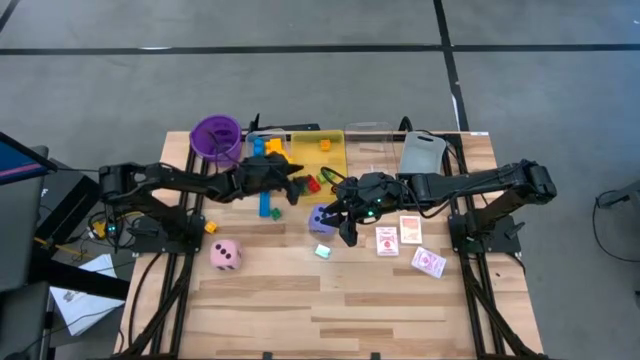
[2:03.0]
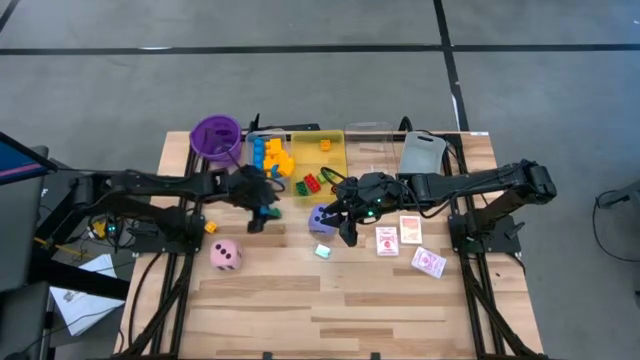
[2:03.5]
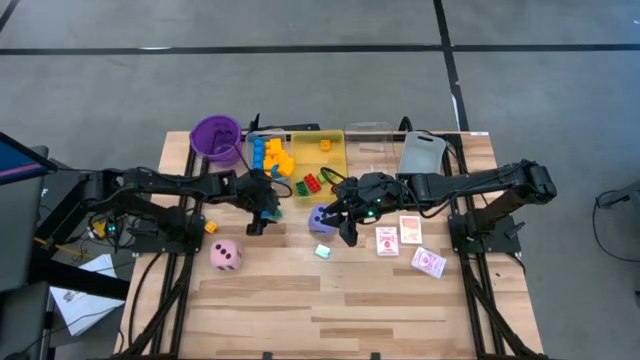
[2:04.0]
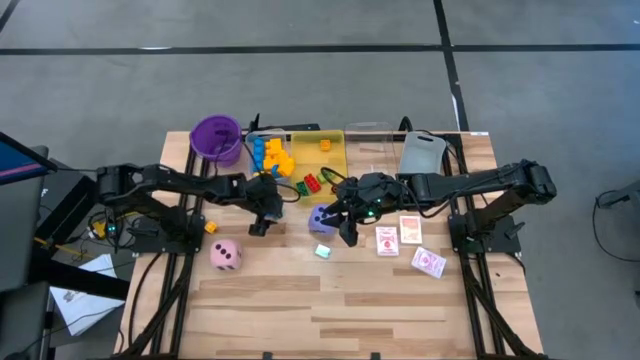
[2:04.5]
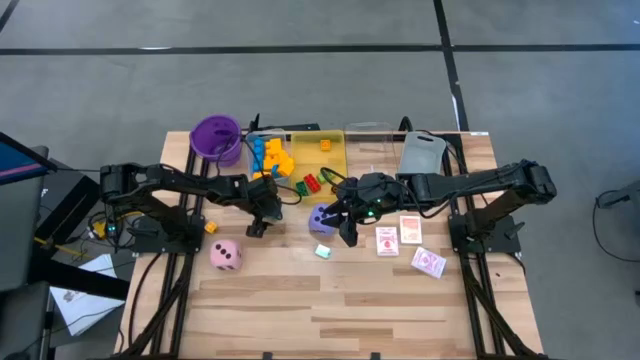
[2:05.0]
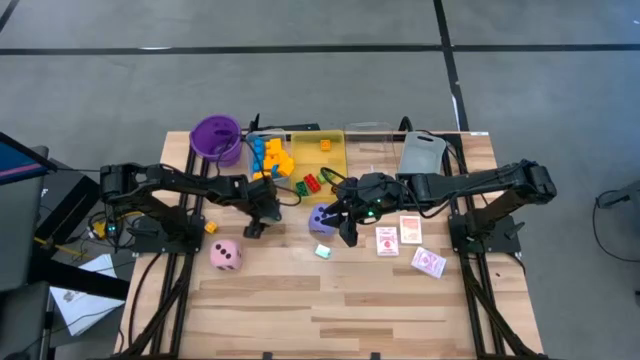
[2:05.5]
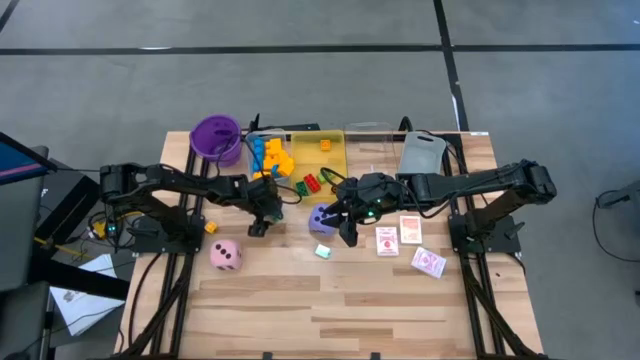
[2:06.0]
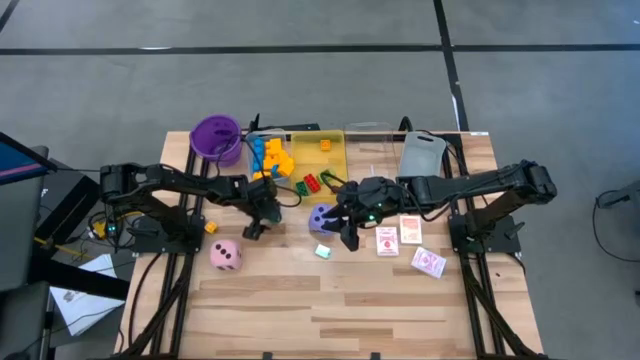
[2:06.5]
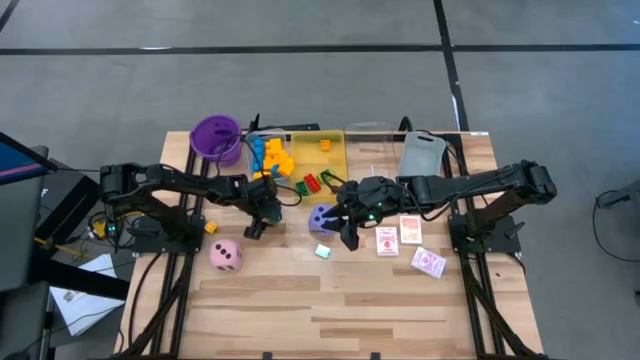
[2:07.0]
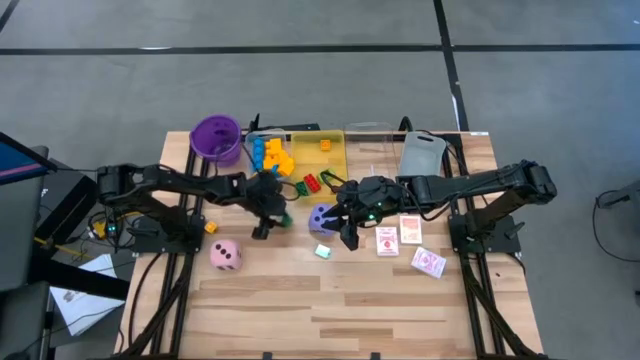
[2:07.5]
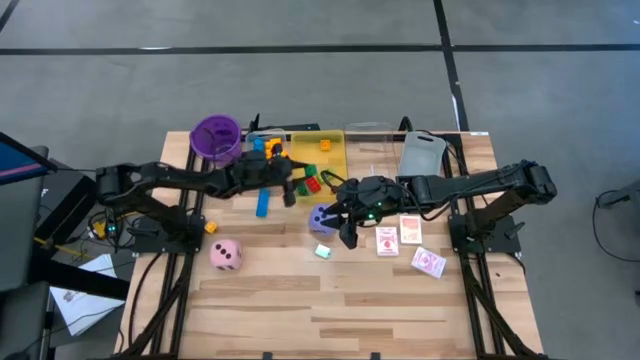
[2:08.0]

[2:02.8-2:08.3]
Task: Pick & Place Toys
Put the green four stud game piece into the yellow bin

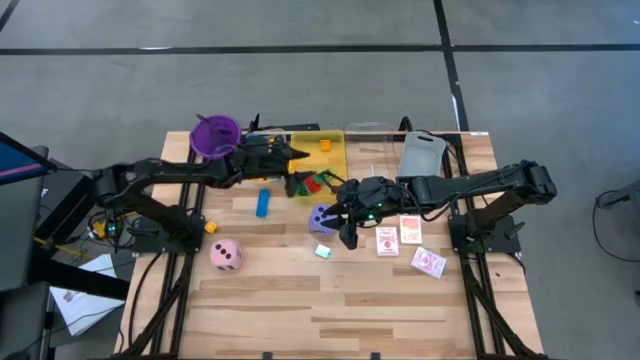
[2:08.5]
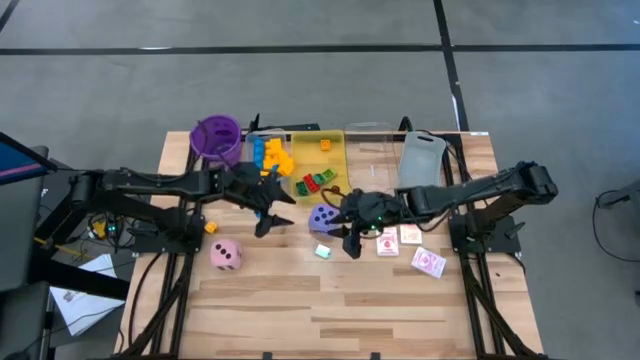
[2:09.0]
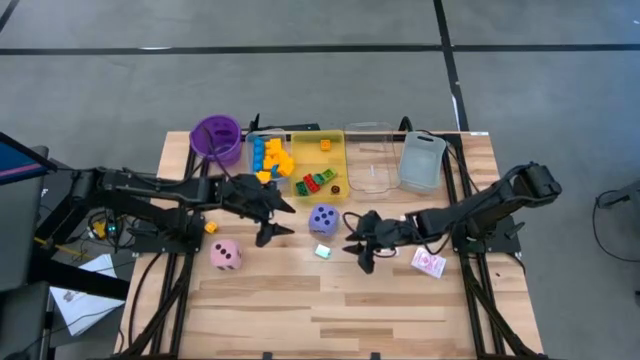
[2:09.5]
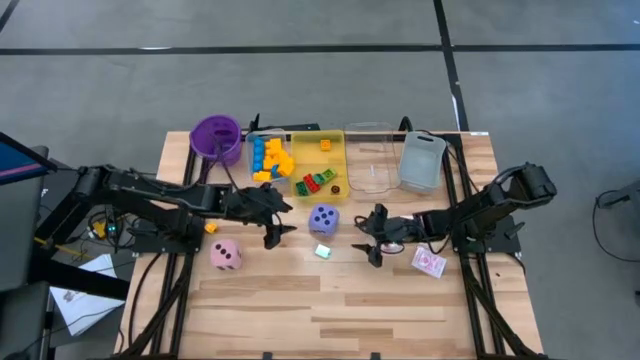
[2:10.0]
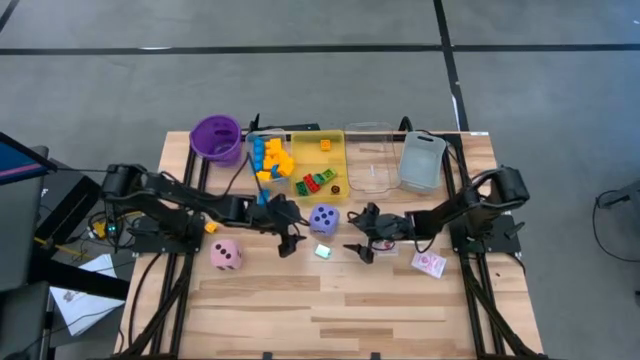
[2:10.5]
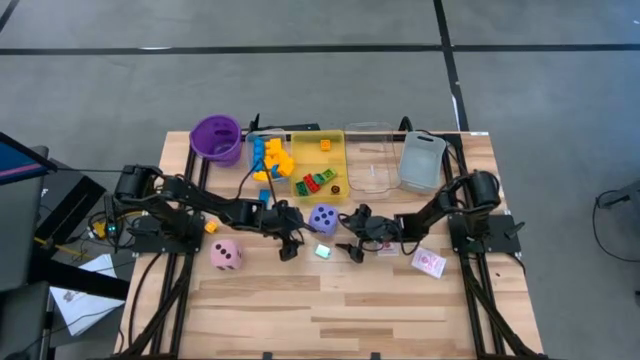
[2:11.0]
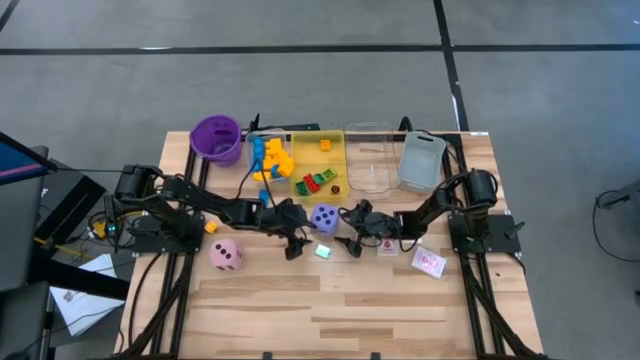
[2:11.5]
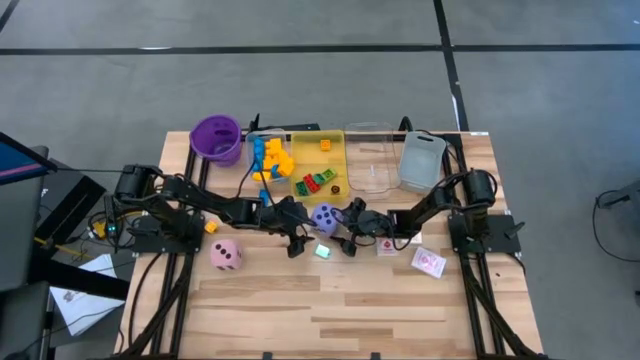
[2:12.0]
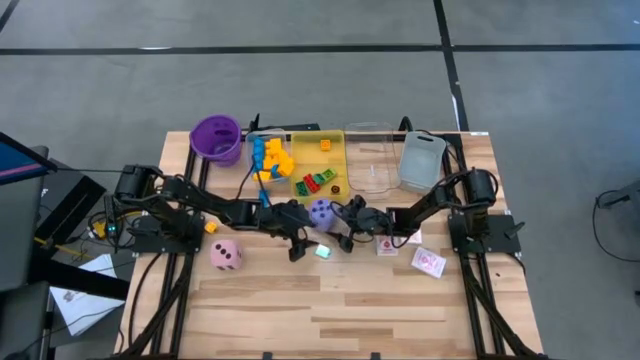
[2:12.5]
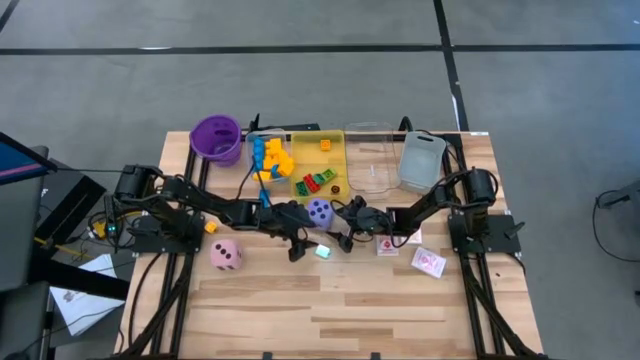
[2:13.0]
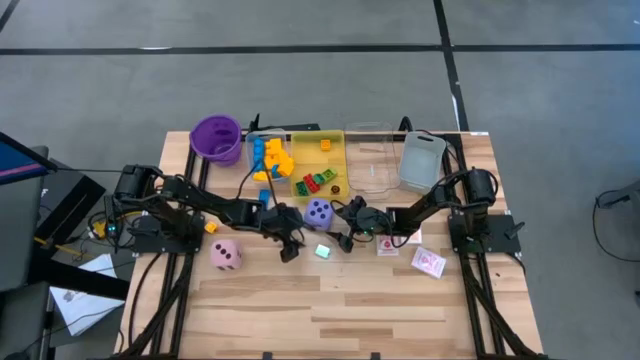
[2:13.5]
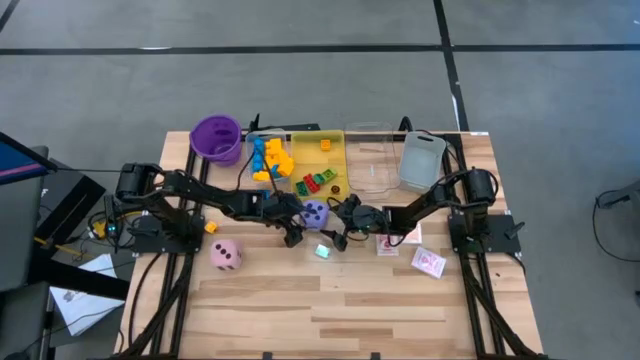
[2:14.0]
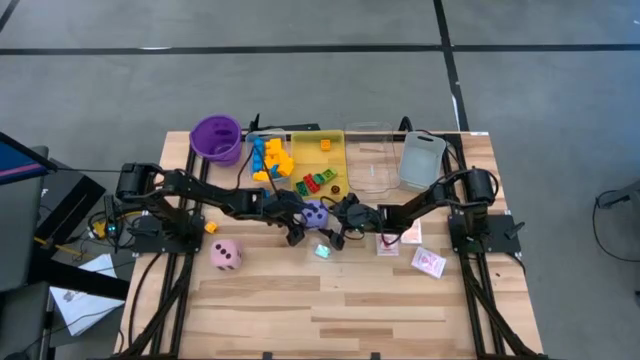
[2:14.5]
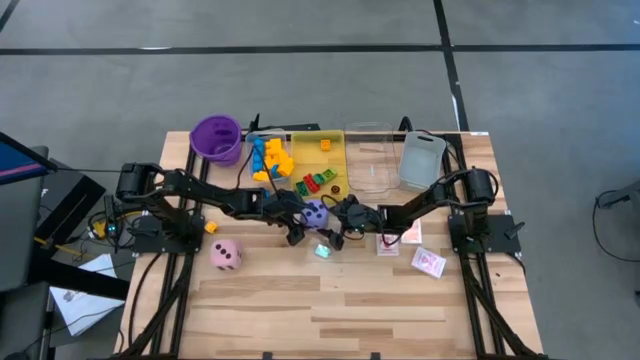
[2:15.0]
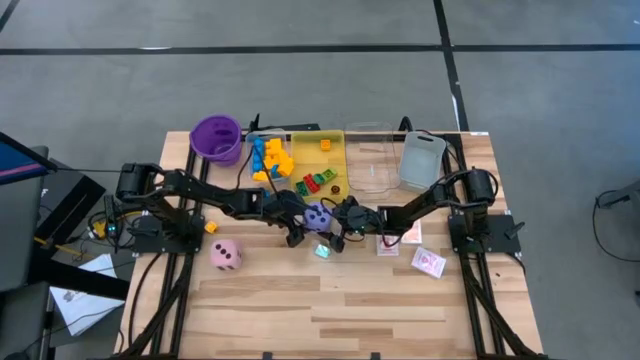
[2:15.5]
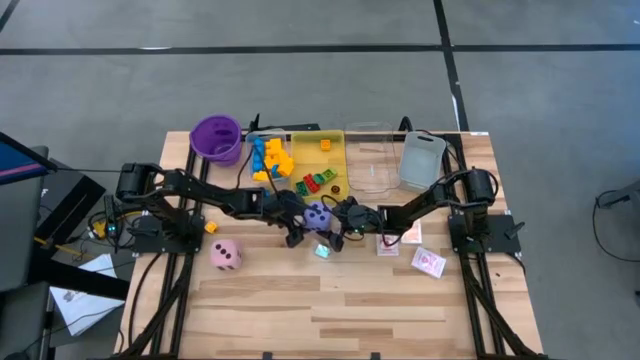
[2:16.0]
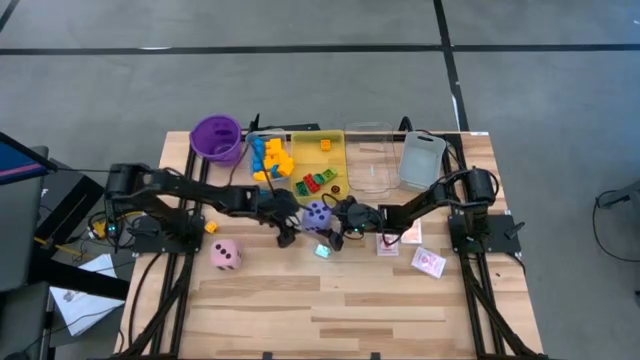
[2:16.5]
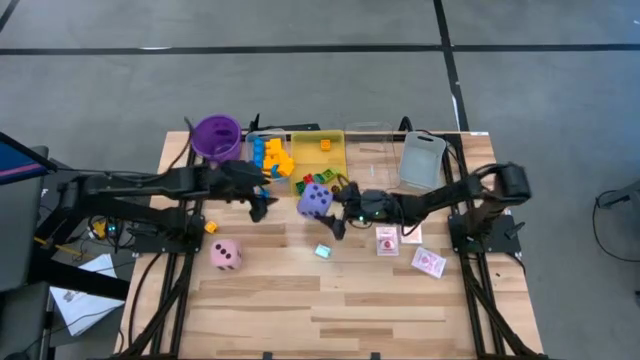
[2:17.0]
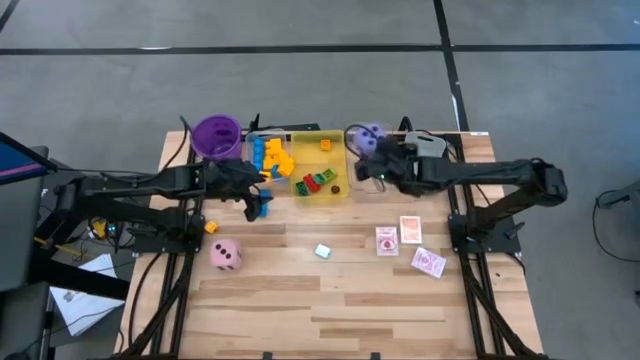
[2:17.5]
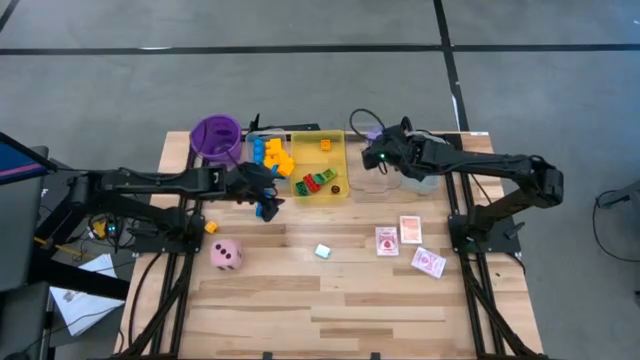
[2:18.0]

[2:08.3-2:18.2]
Put the violet dice into the right transparent bin

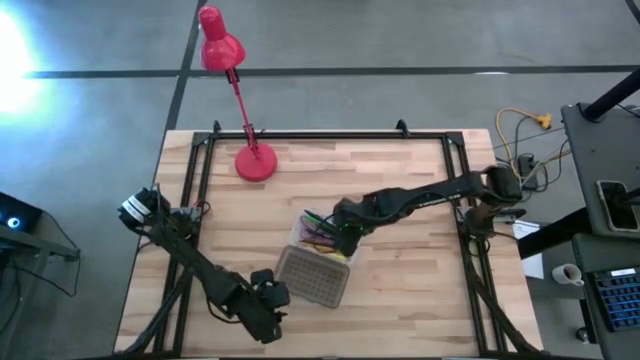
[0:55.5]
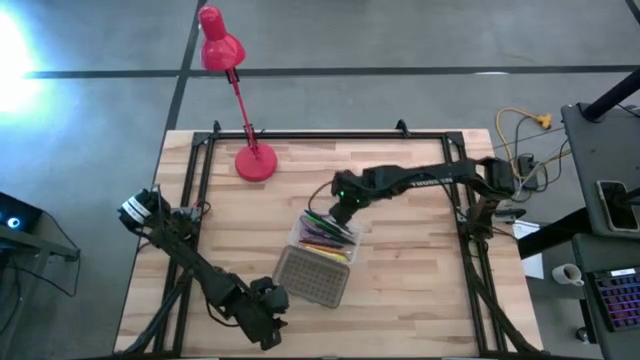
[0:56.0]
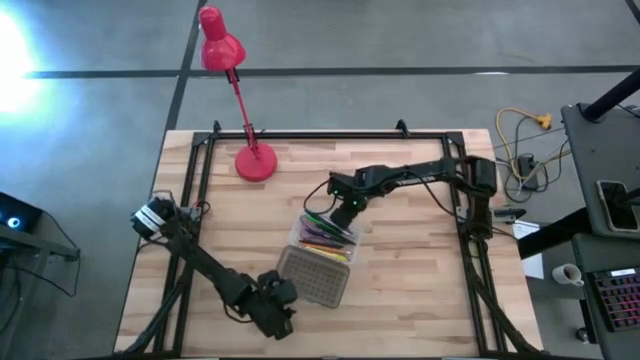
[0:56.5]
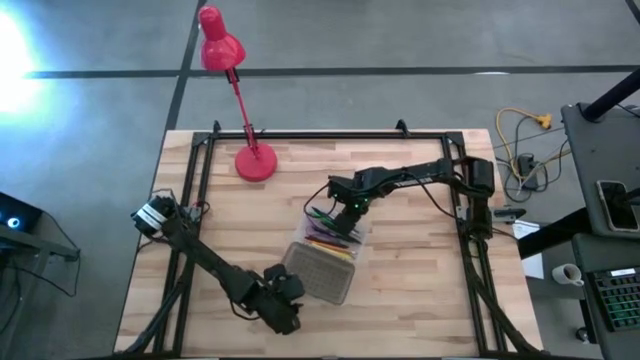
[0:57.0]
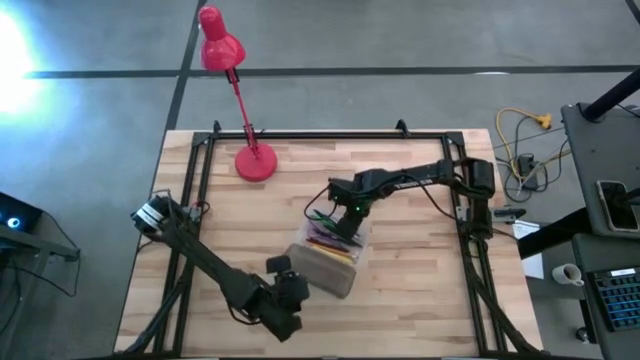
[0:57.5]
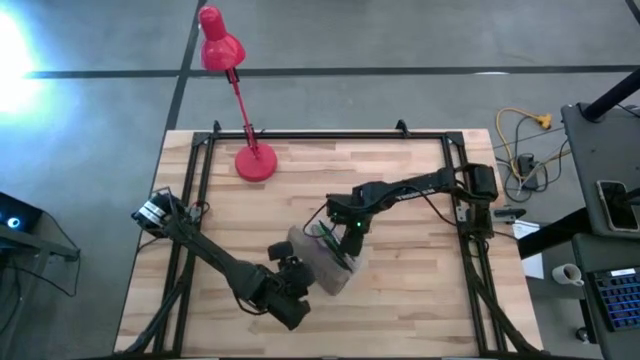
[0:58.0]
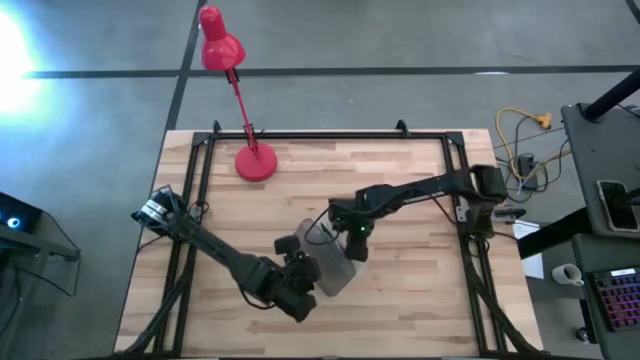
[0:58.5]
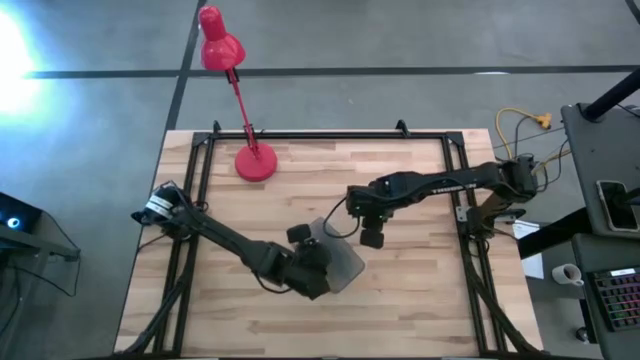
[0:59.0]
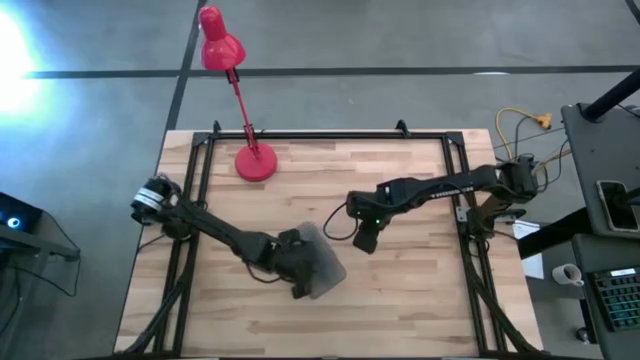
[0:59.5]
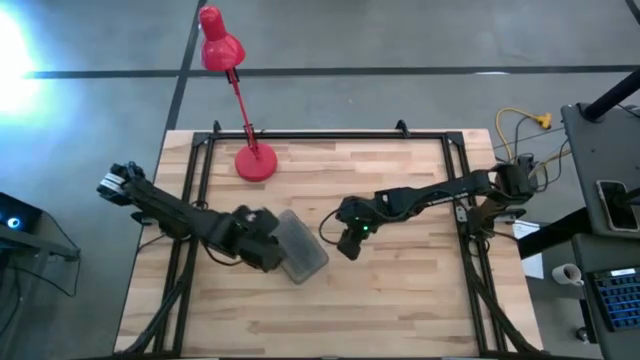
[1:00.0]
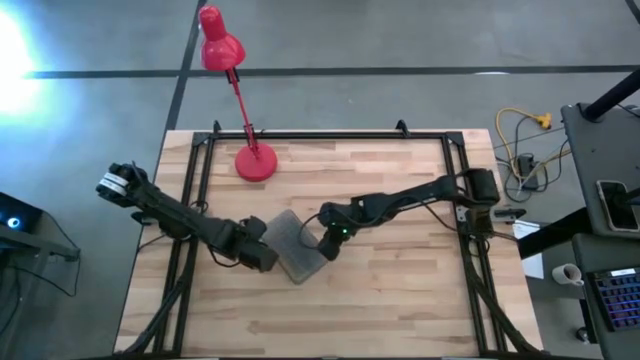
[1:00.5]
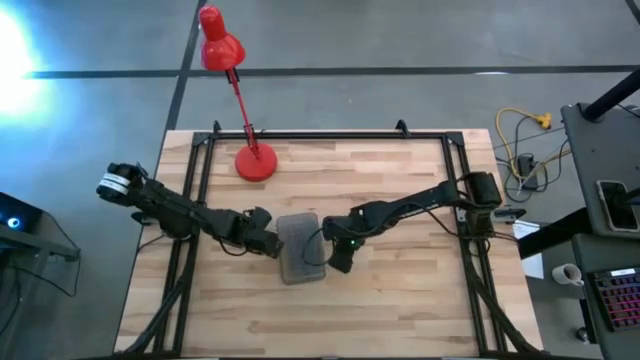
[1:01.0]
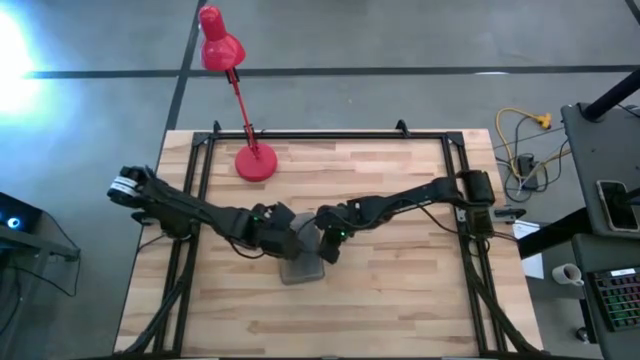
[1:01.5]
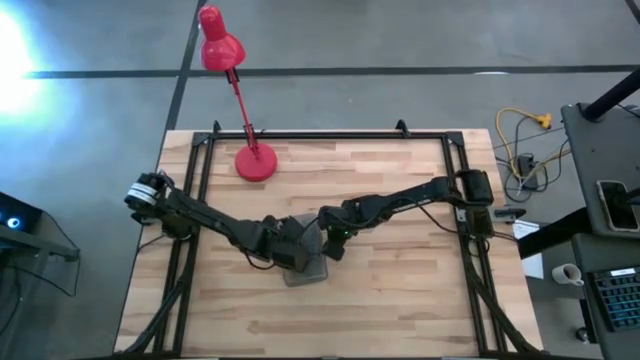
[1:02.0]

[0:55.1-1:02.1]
Task: Pick & place school supplies into a supply box
Close the supply box
